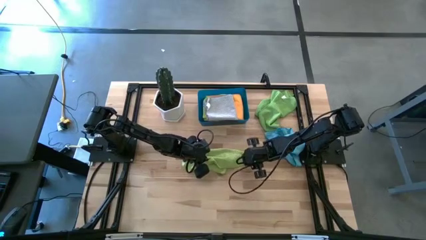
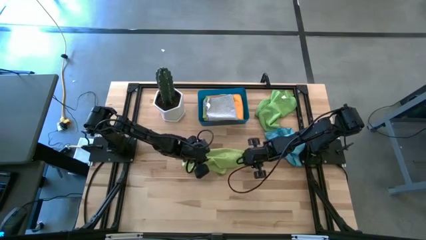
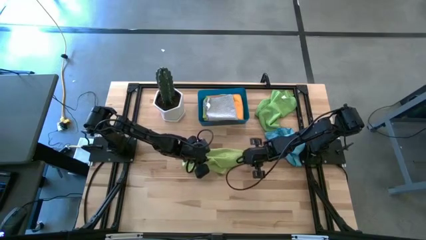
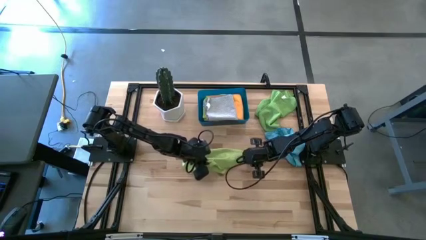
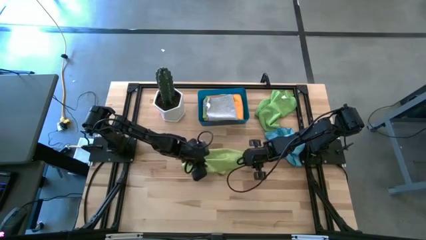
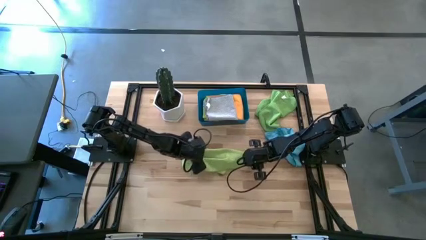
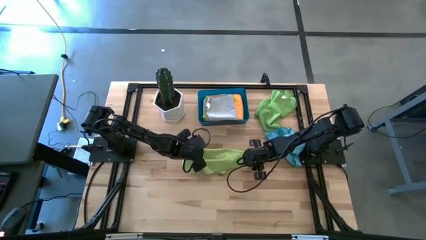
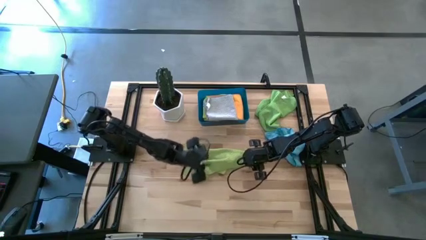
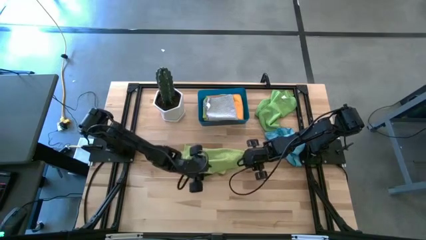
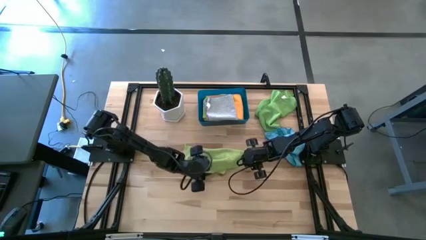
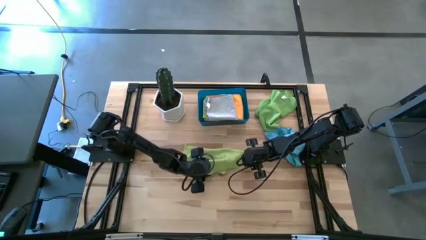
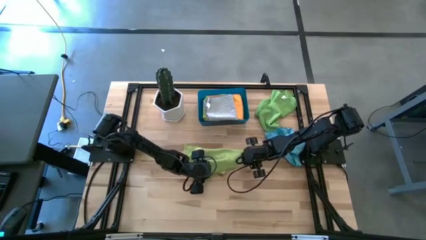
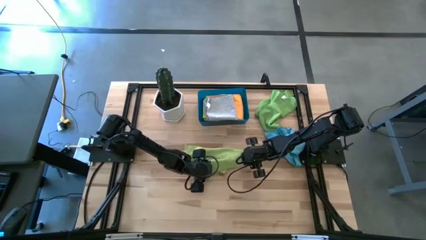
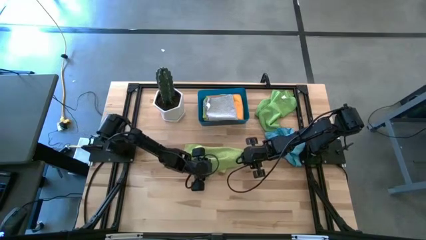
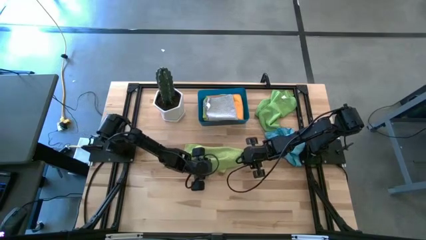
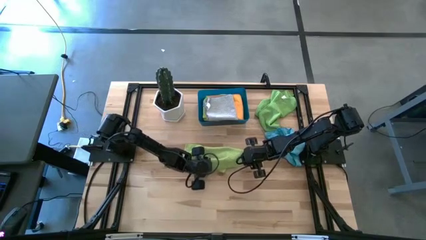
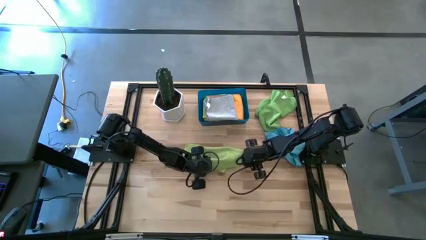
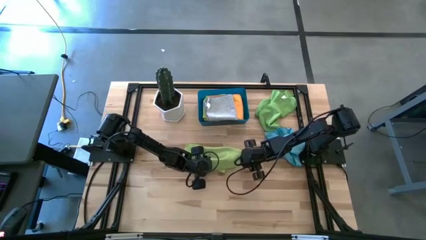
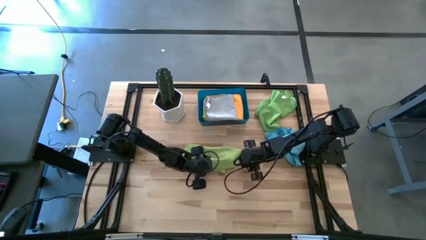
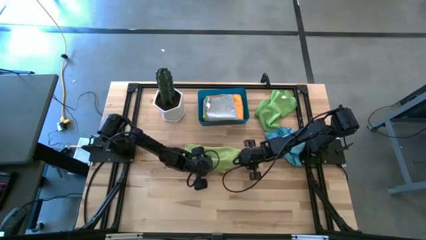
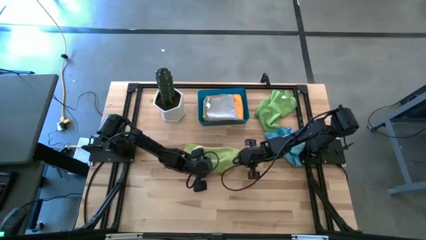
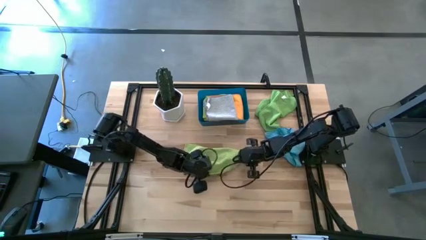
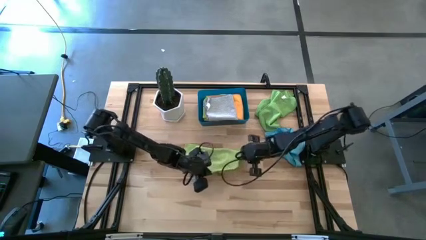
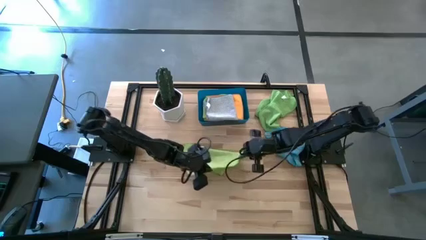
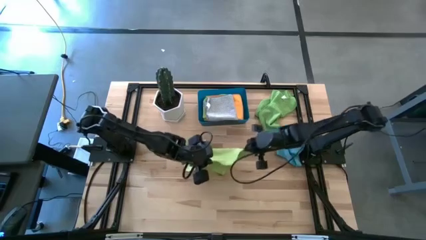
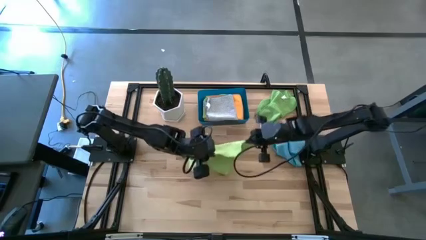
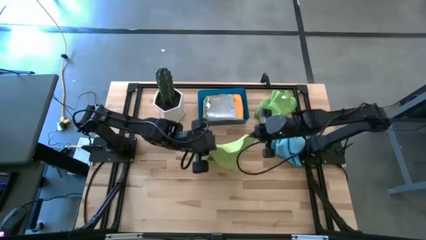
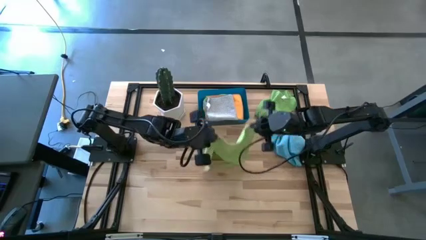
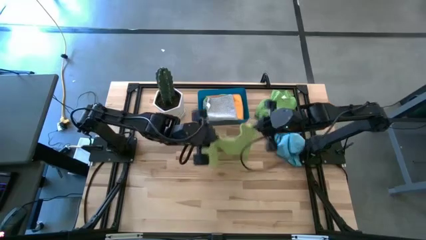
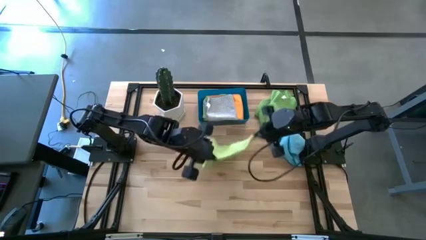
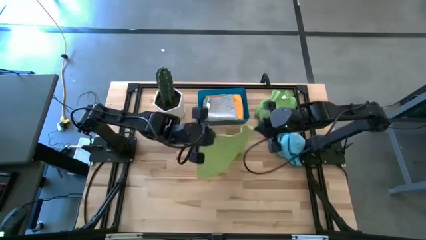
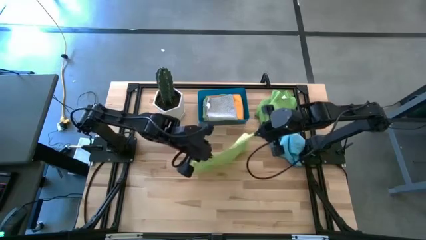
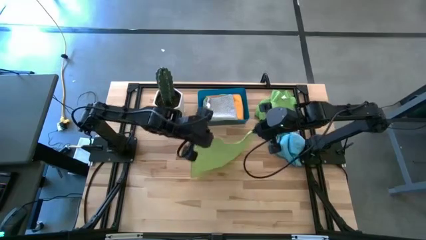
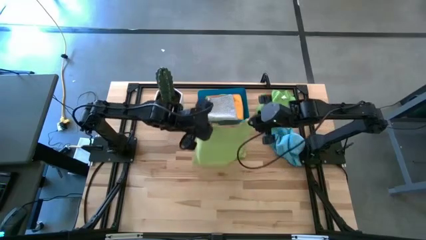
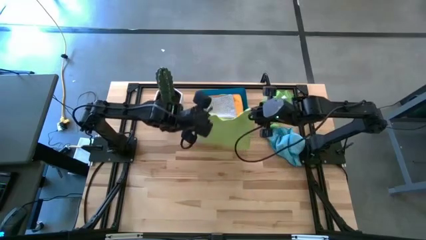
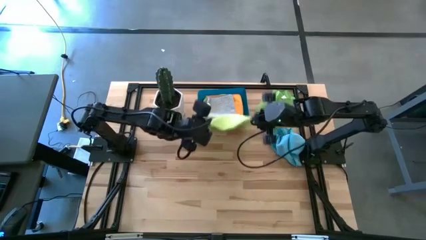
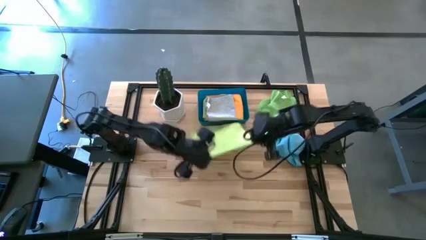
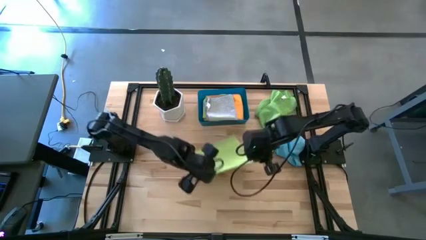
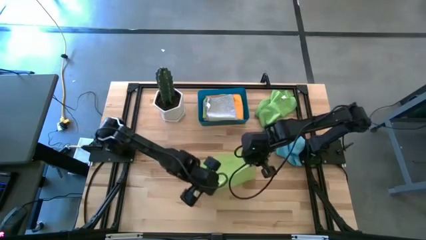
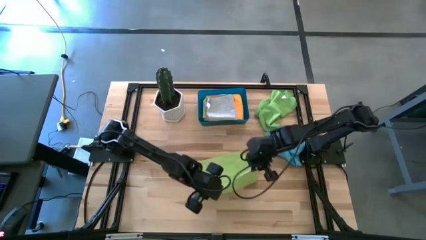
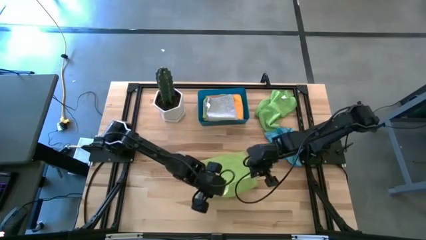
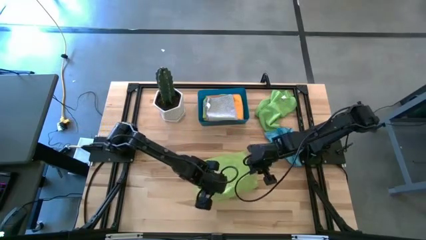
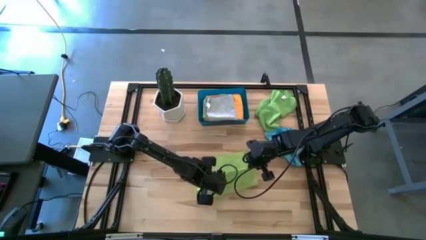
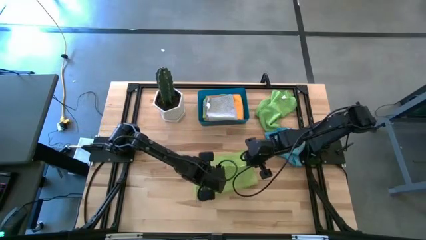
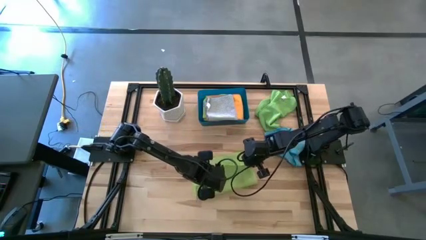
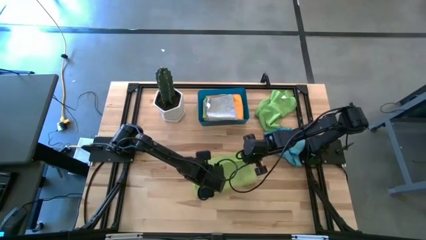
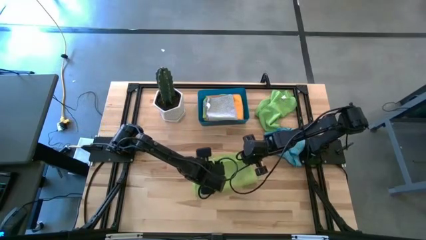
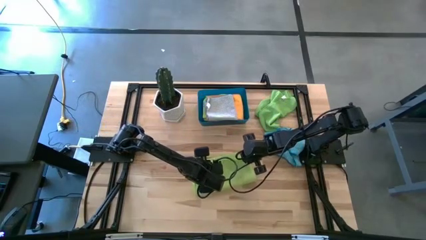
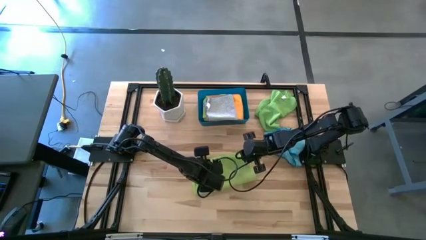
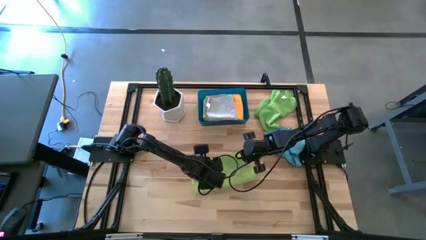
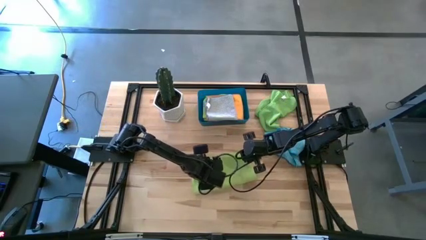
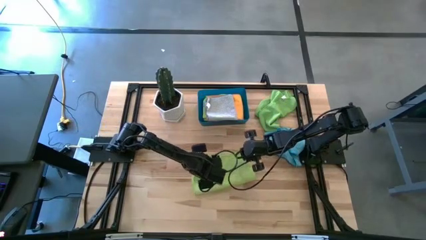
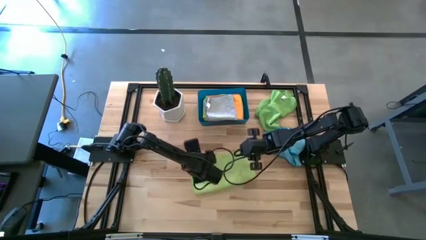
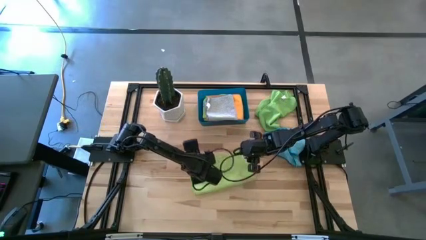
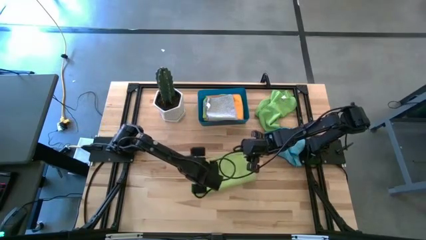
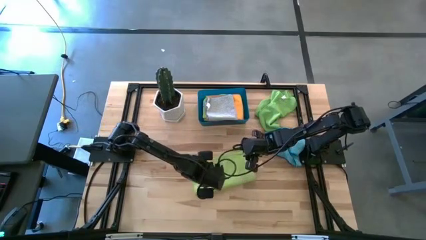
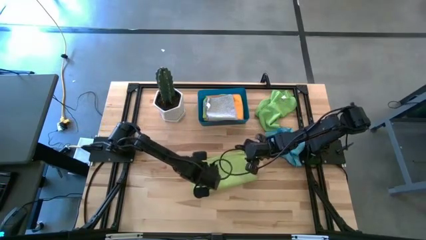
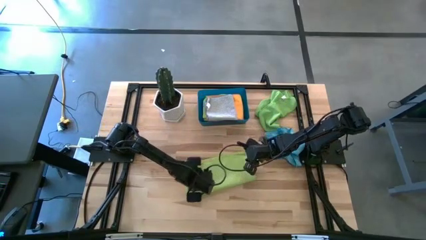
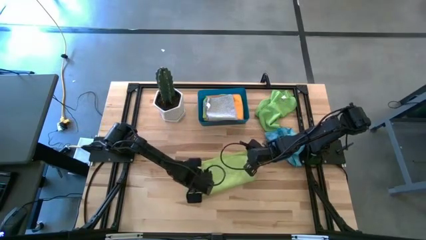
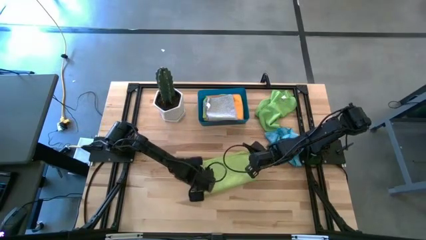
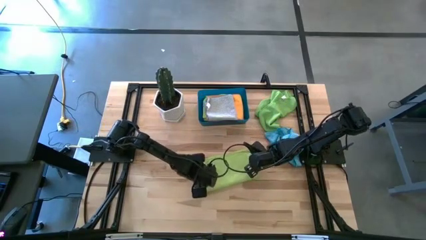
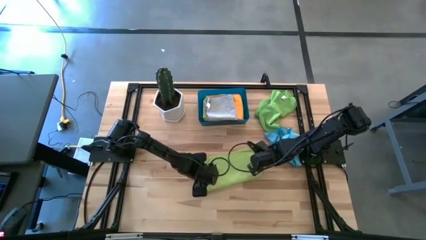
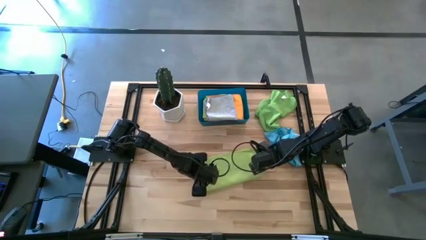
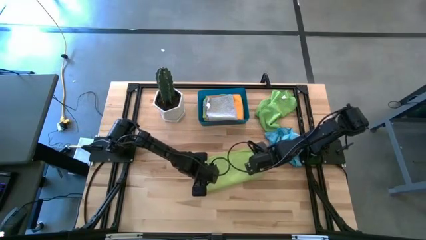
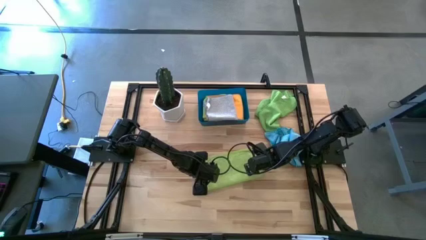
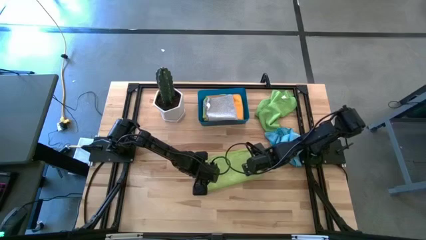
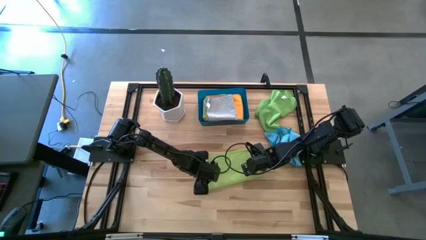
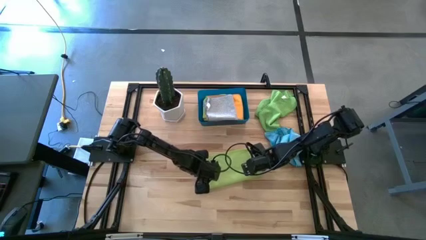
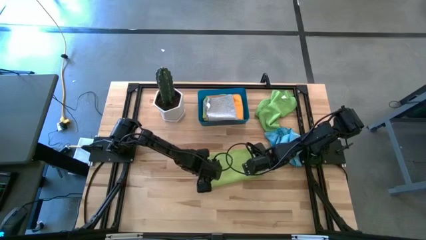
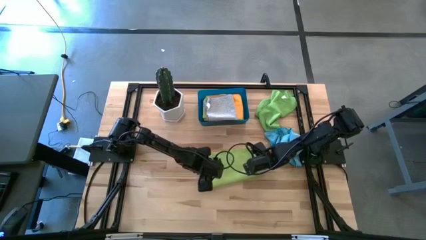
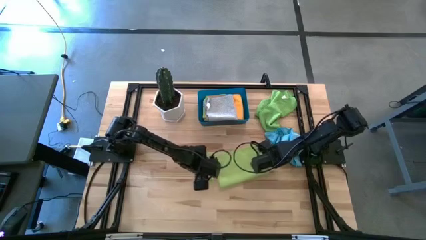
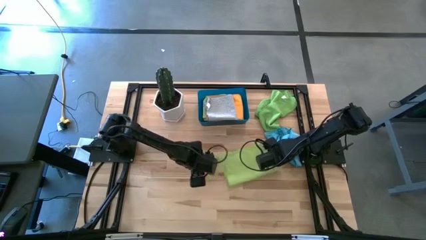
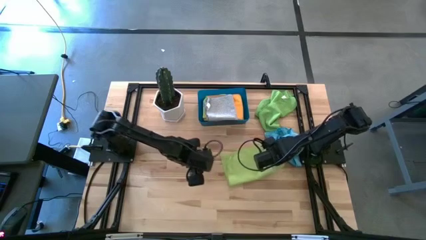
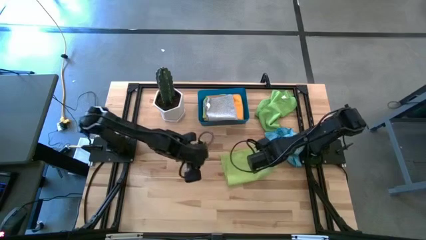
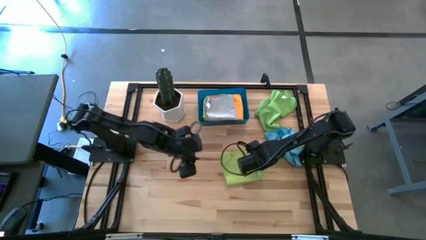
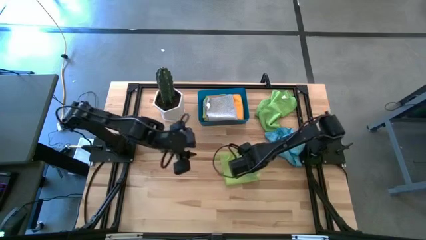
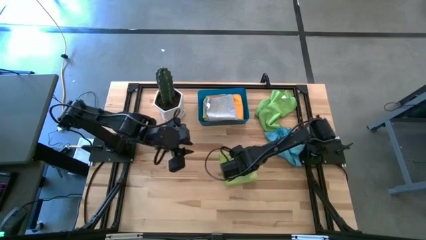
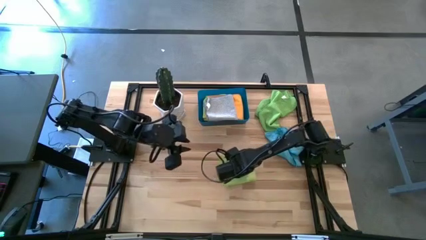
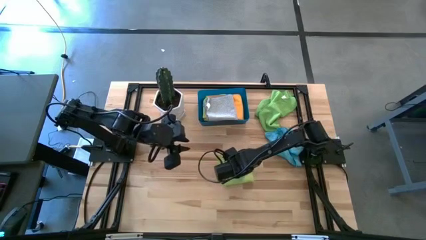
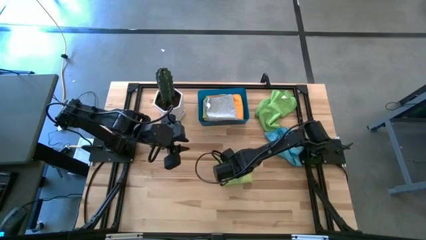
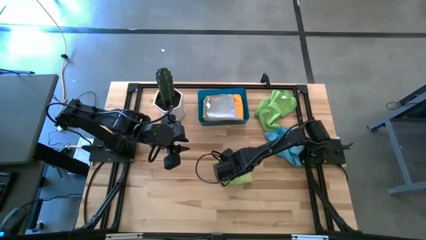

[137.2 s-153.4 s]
Task: Fold microfiber towels
Fold the bottom green microfiber towel
